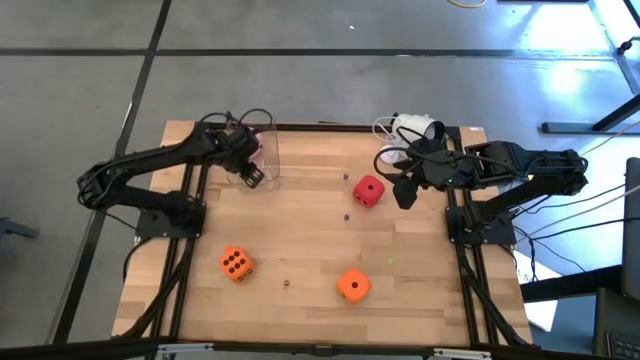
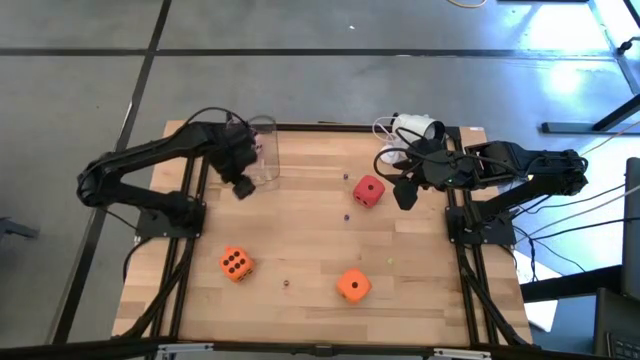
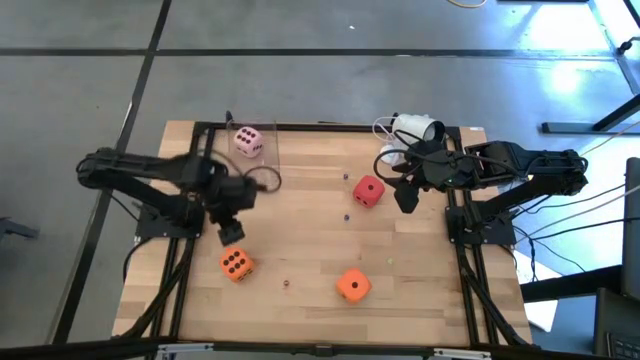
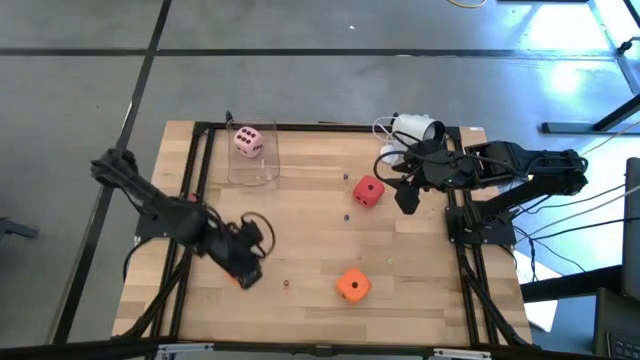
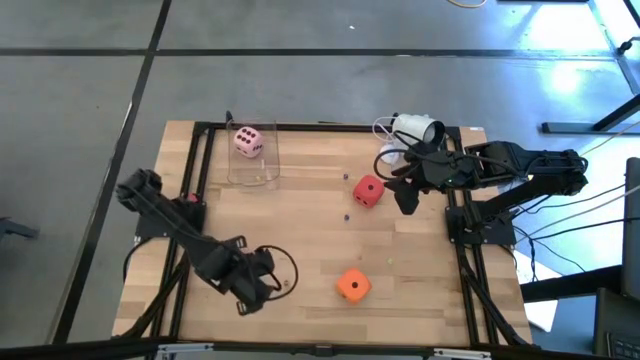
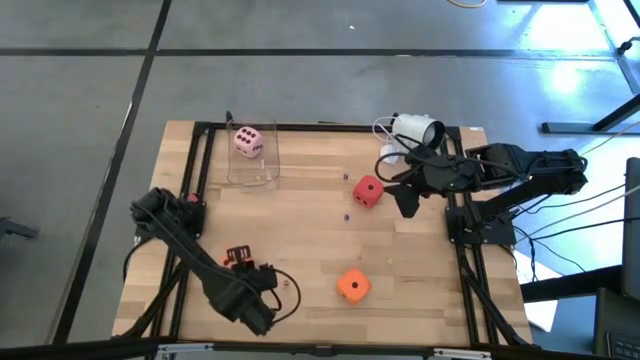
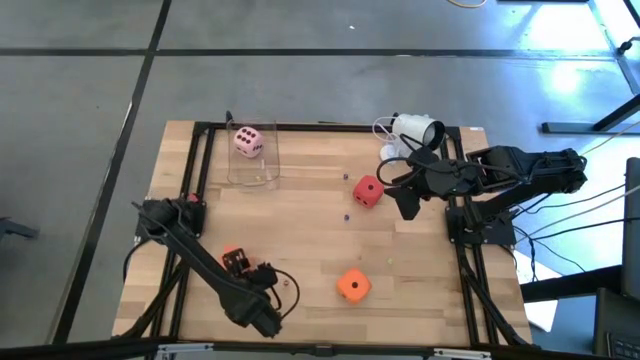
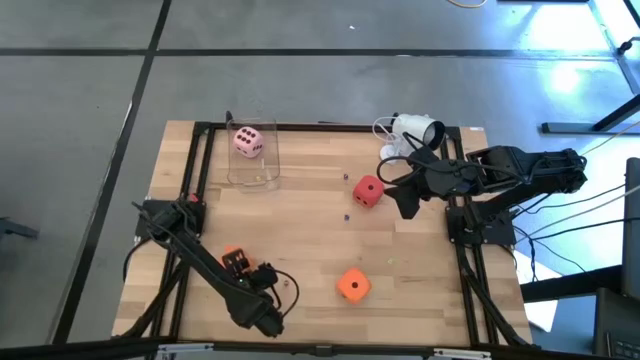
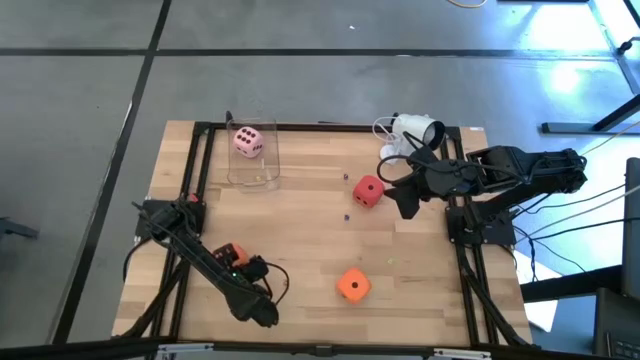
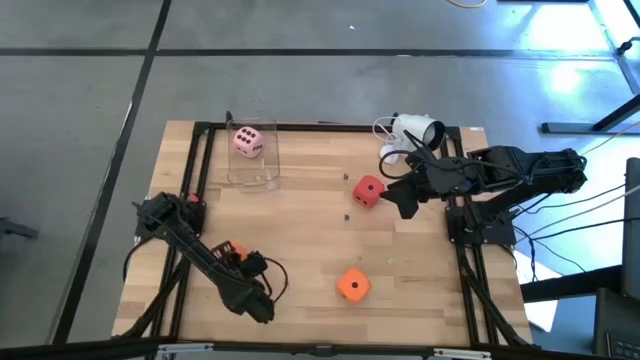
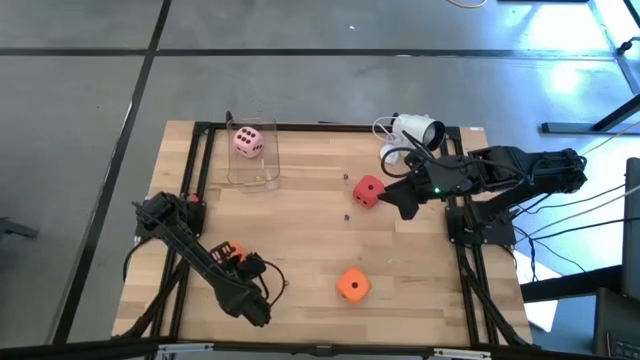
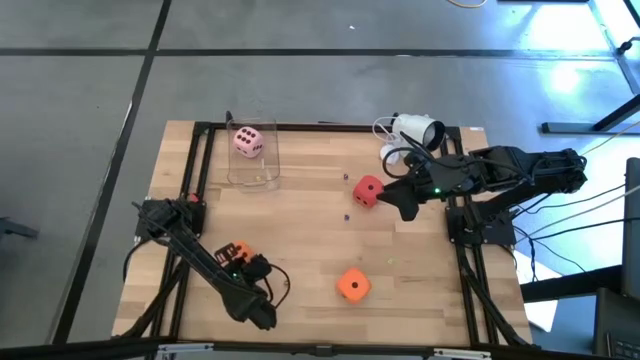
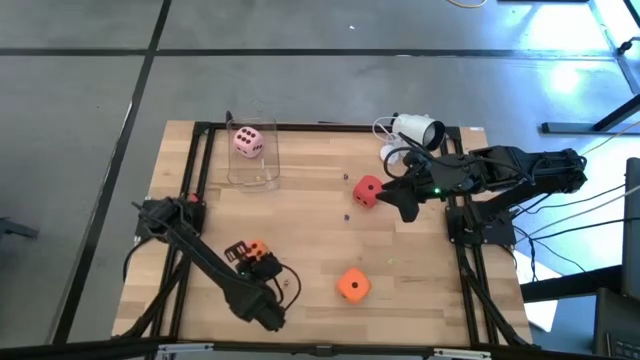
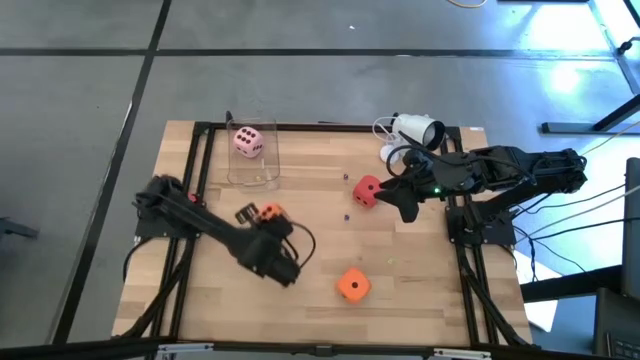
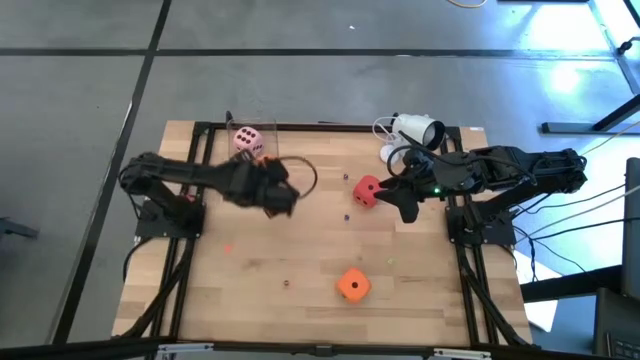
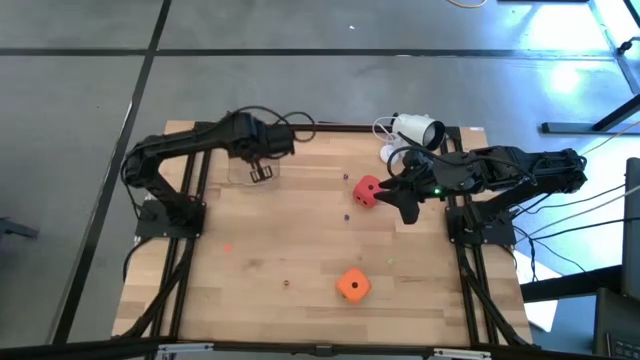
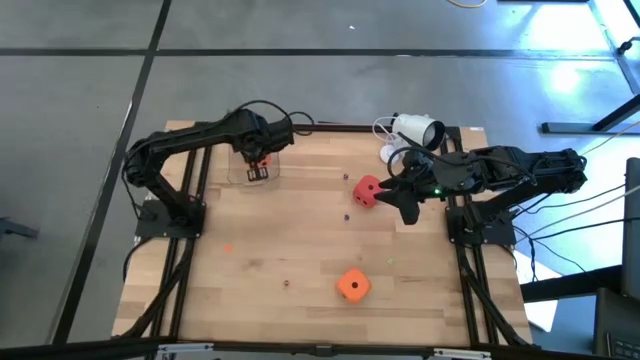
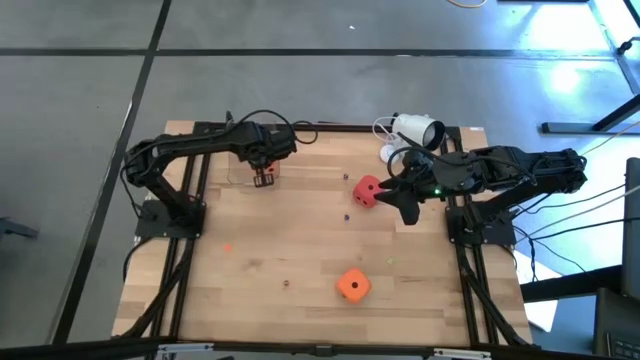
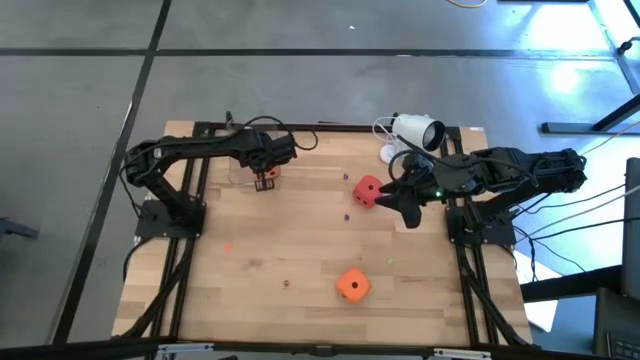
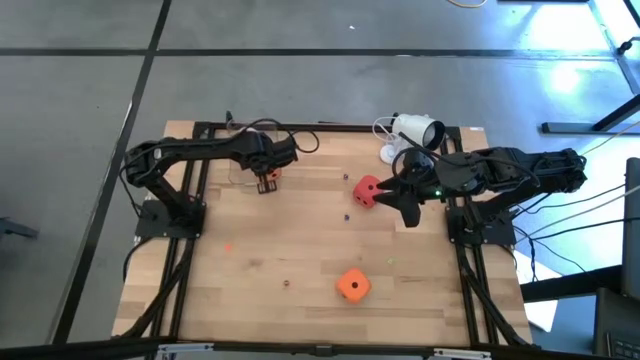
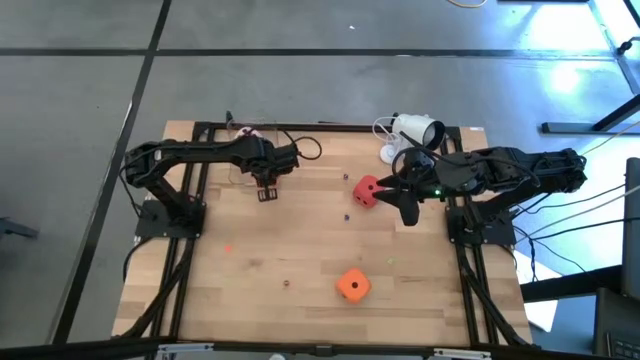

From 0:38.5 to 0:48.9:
Task: Pick & Place Dice
Put the large left orange dice into the transparent bin

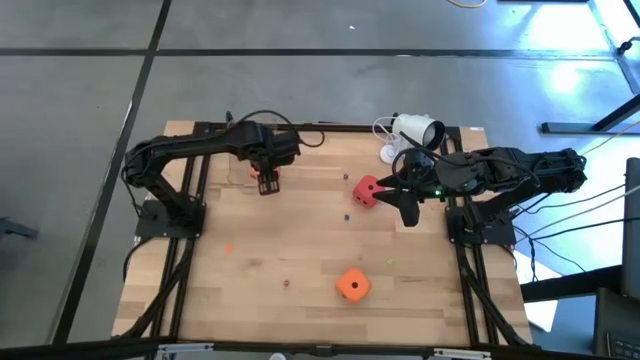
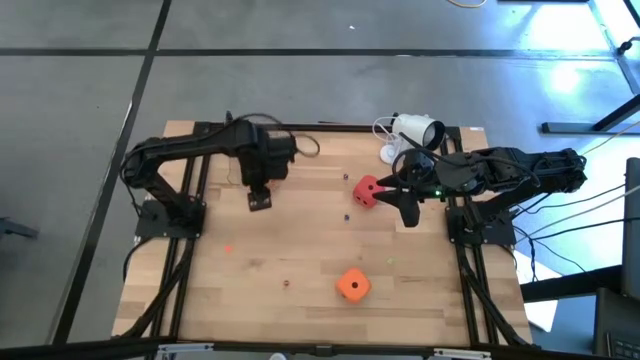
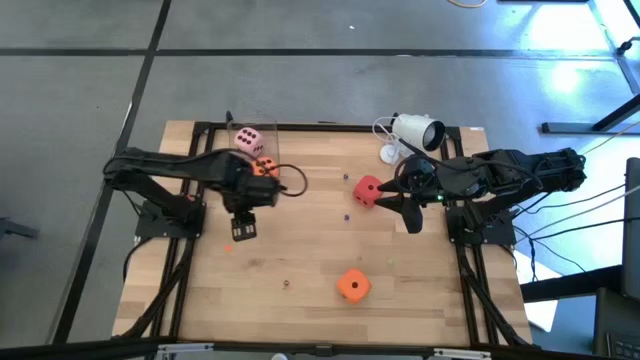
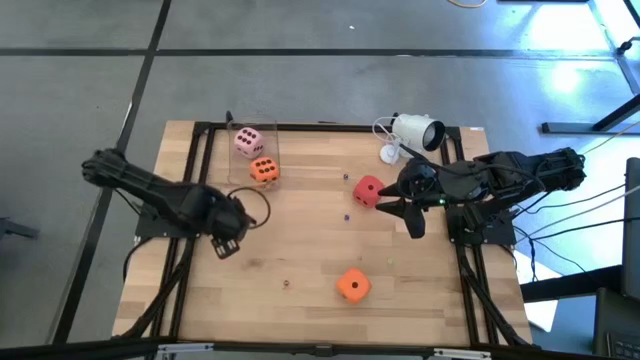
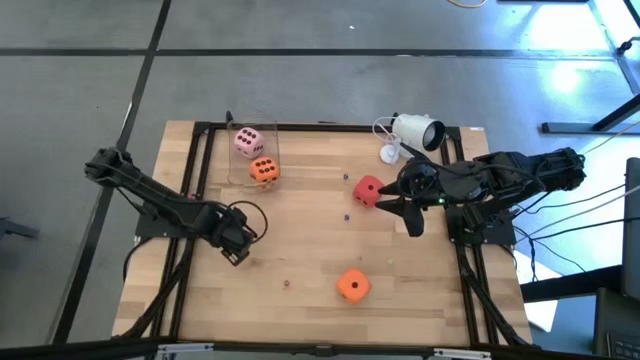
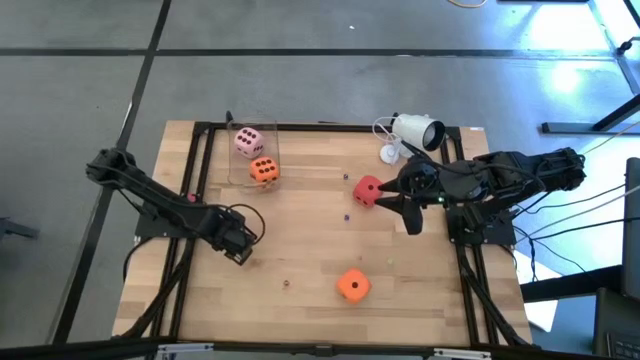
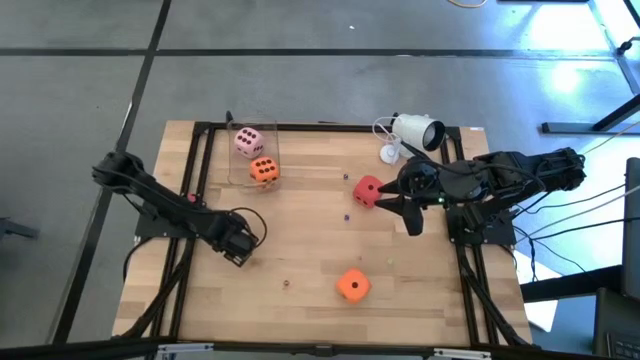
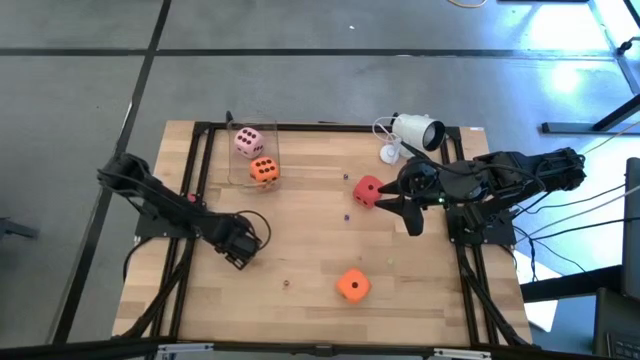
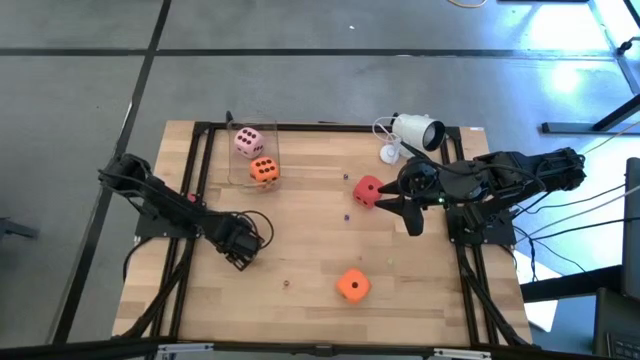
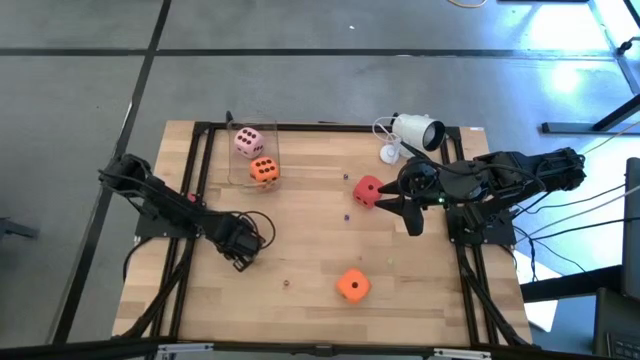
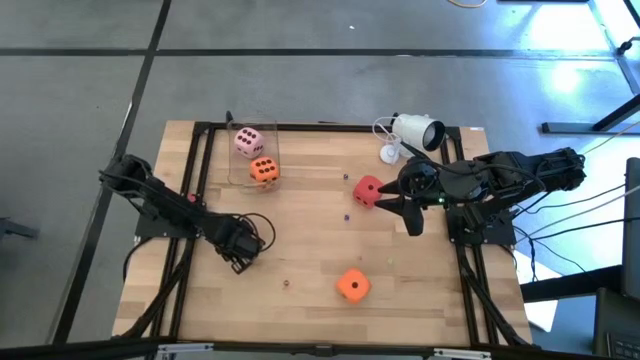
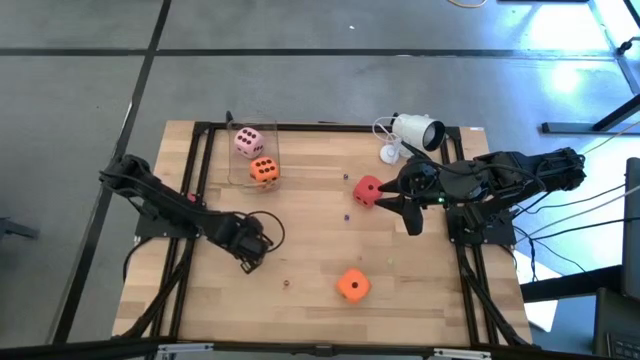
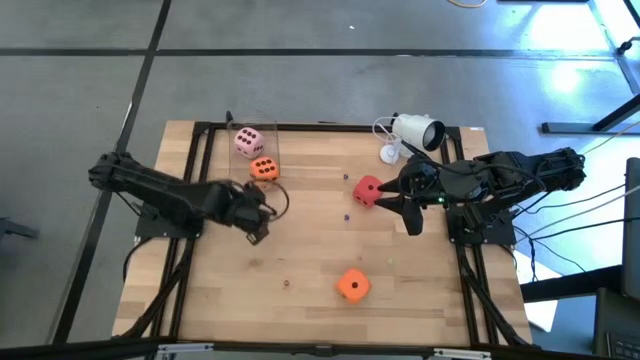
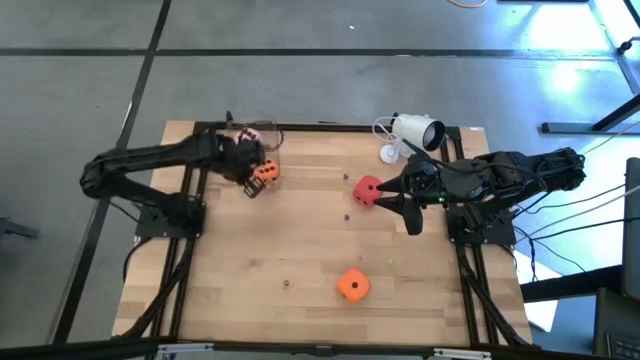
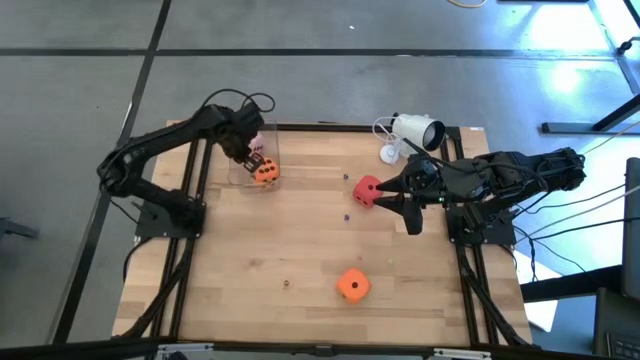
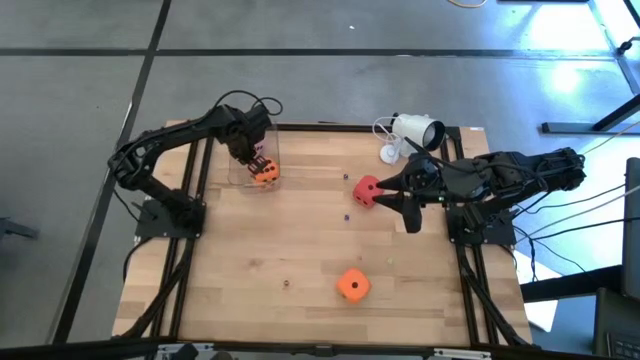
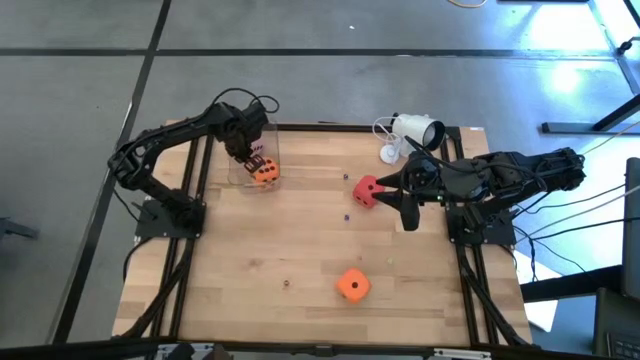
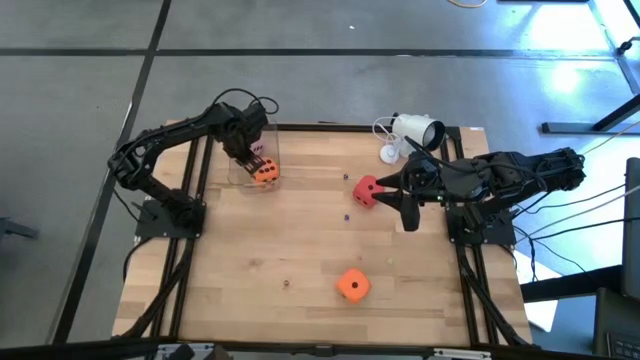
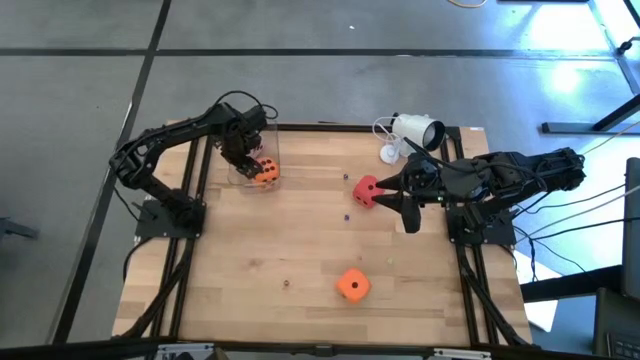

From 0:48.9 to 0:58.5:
Put the small orange dice into the transparent bin

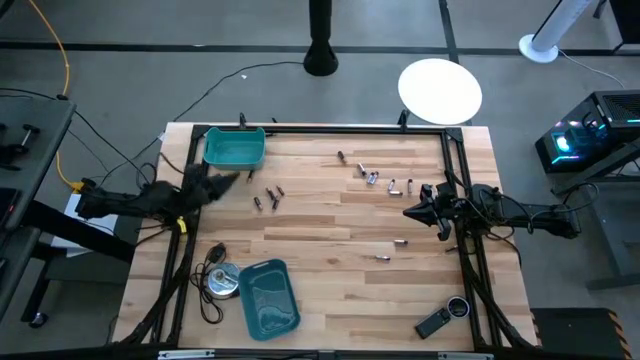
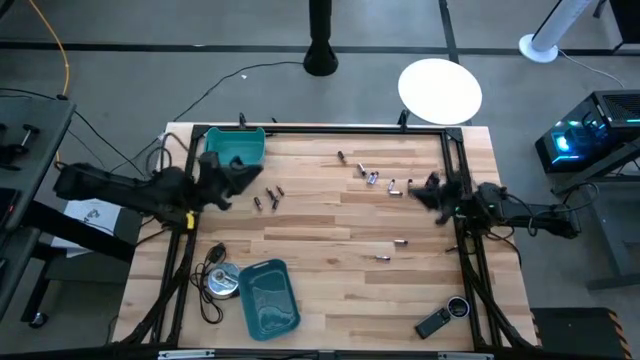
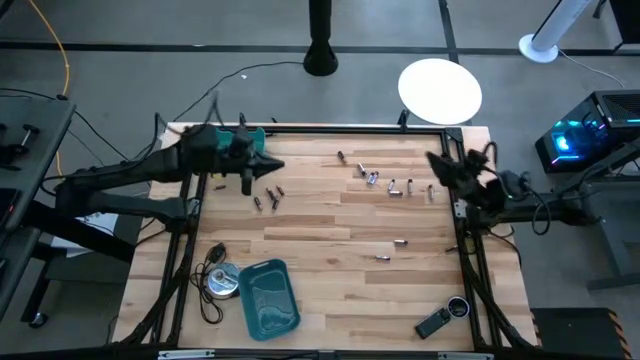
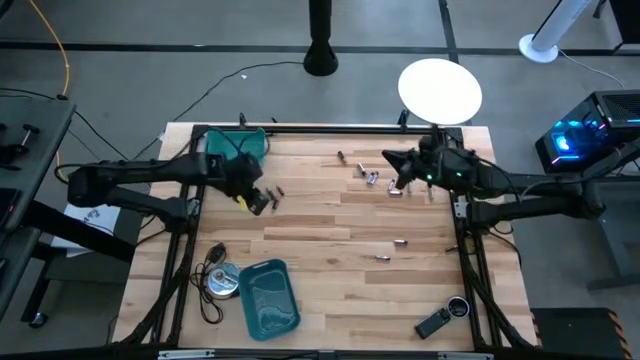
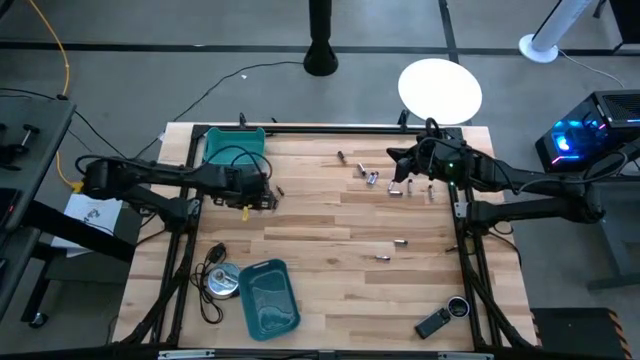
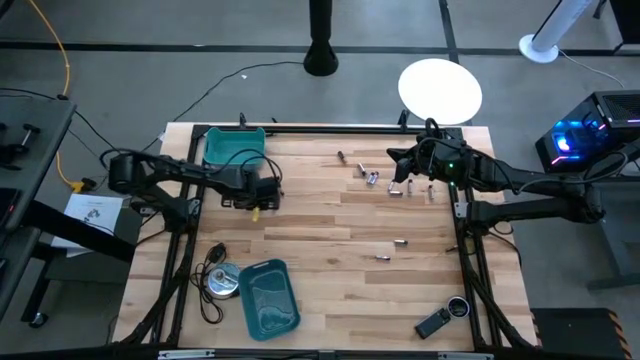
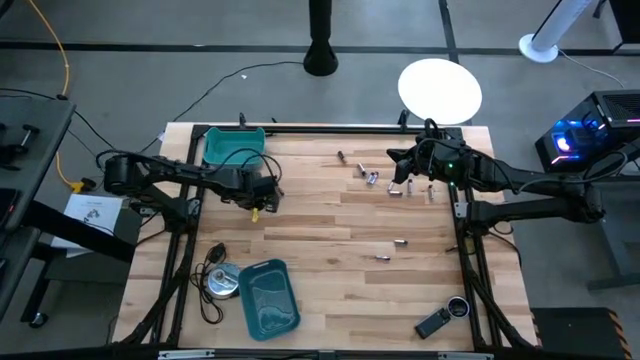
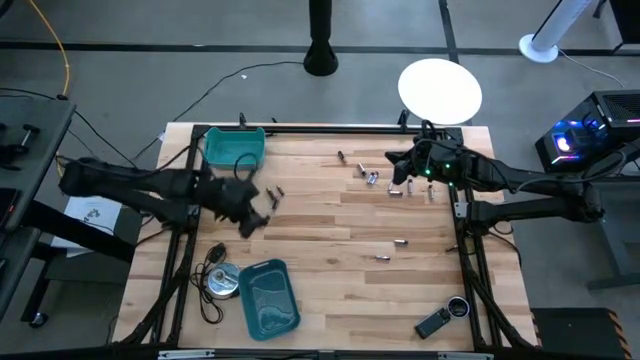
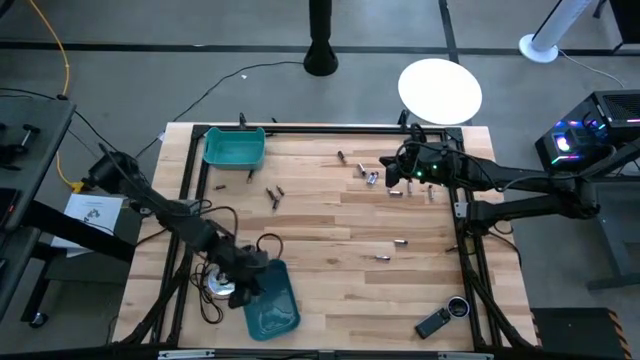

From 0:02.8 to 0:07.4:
Task: Sort batteries
Put the black battery into the blue bin
